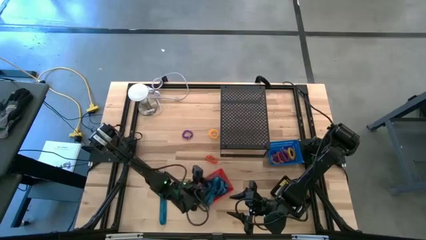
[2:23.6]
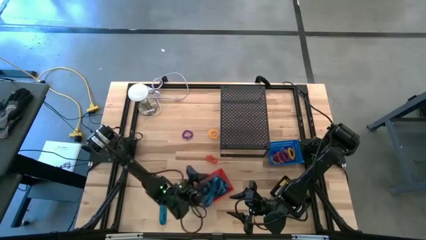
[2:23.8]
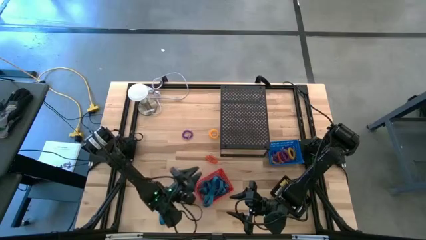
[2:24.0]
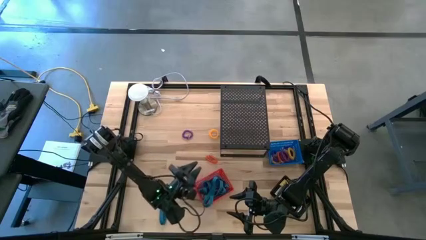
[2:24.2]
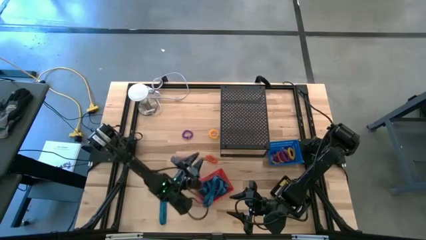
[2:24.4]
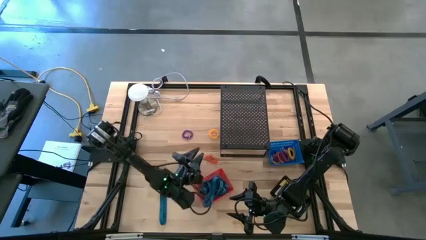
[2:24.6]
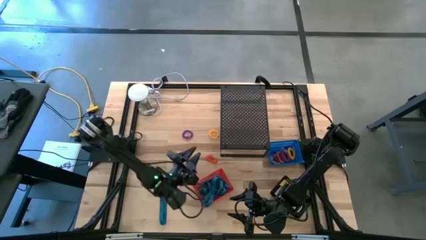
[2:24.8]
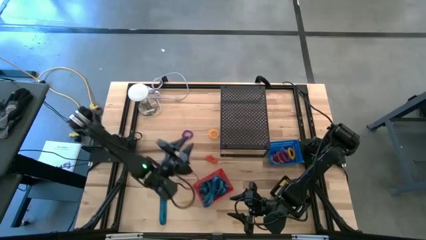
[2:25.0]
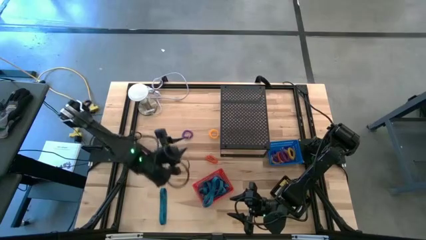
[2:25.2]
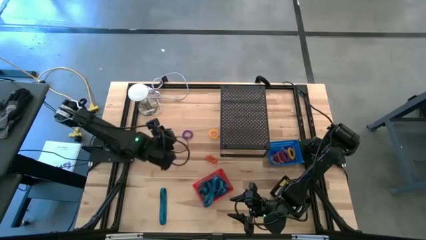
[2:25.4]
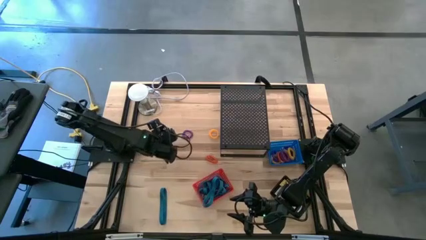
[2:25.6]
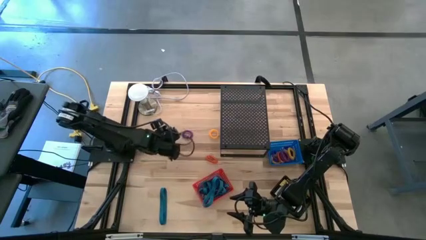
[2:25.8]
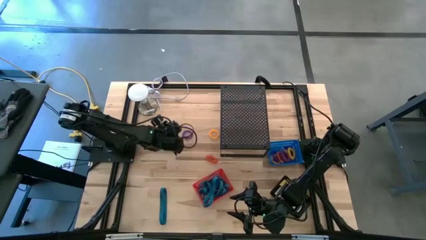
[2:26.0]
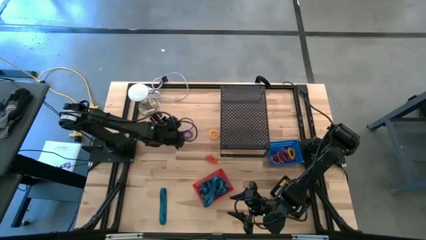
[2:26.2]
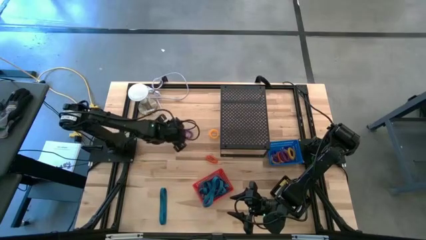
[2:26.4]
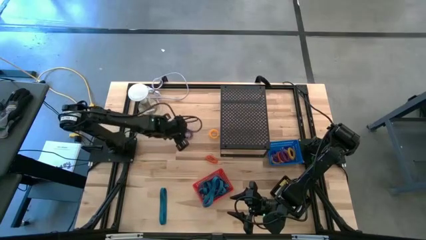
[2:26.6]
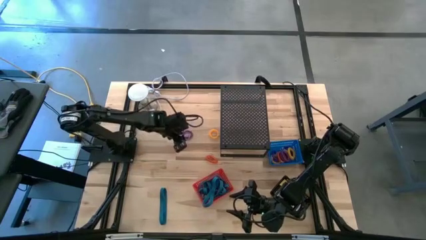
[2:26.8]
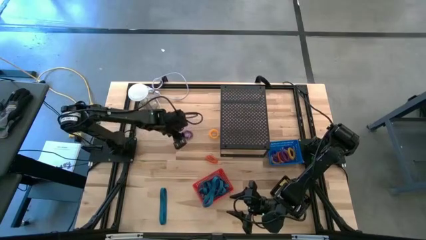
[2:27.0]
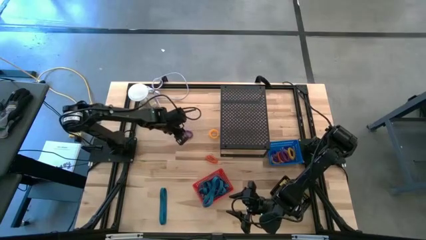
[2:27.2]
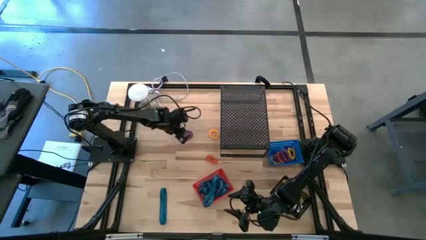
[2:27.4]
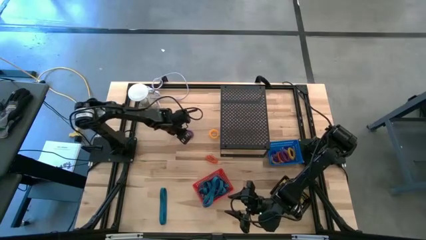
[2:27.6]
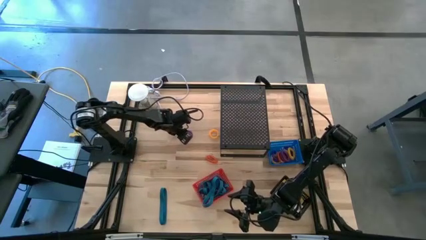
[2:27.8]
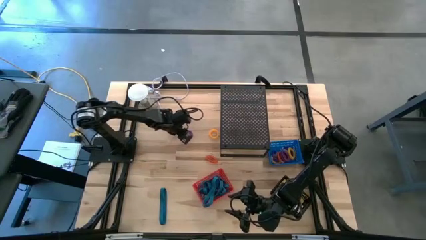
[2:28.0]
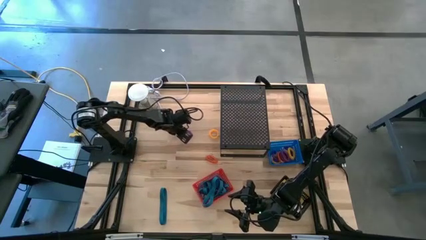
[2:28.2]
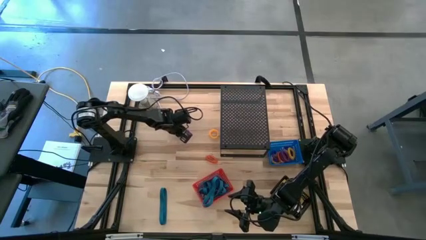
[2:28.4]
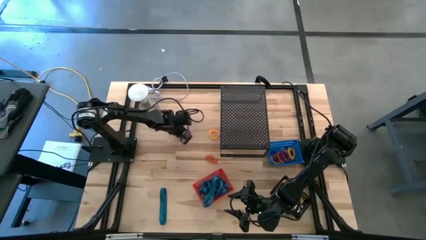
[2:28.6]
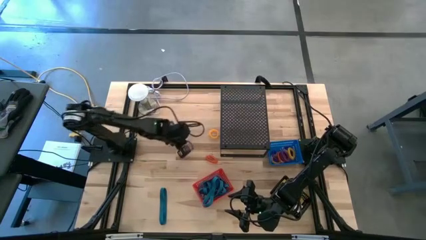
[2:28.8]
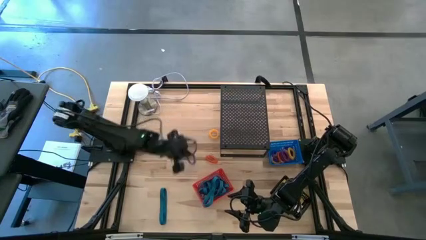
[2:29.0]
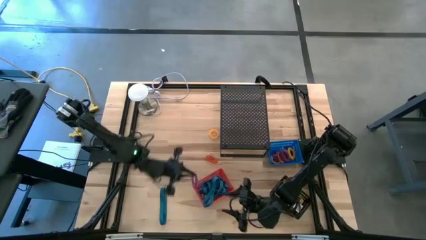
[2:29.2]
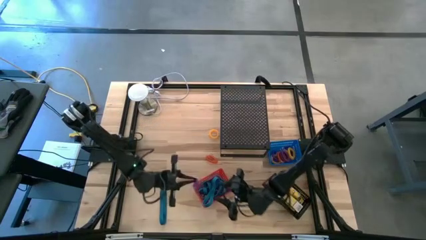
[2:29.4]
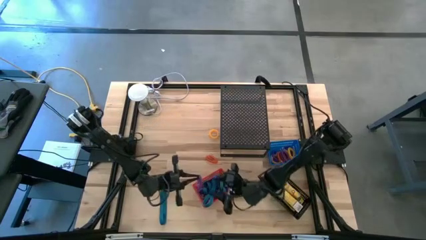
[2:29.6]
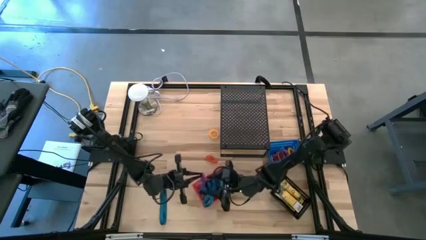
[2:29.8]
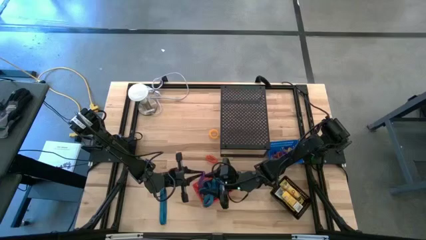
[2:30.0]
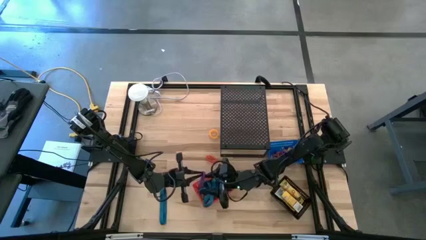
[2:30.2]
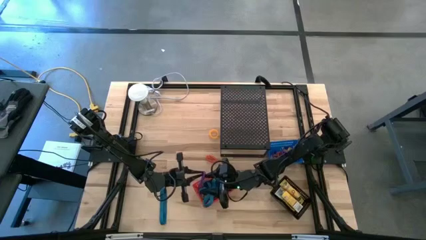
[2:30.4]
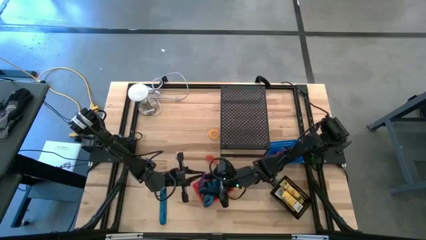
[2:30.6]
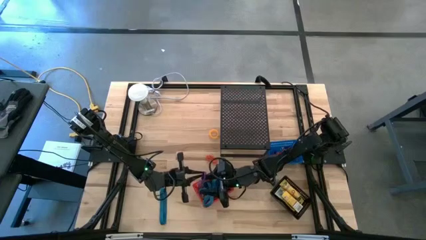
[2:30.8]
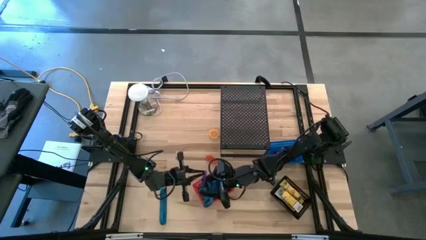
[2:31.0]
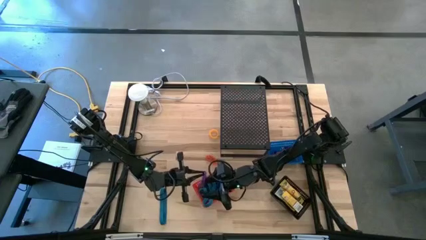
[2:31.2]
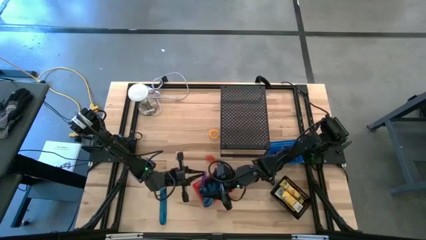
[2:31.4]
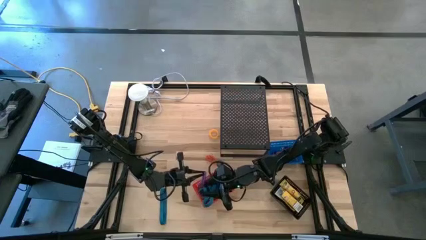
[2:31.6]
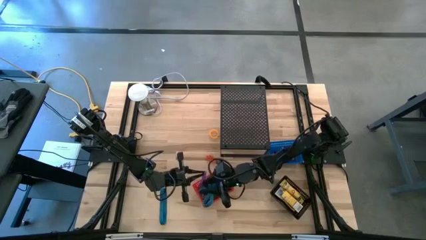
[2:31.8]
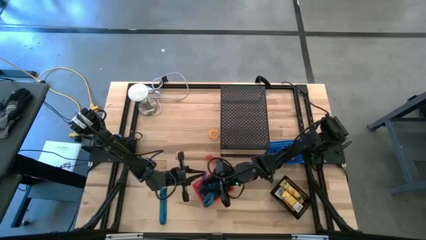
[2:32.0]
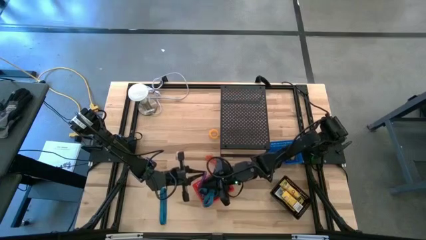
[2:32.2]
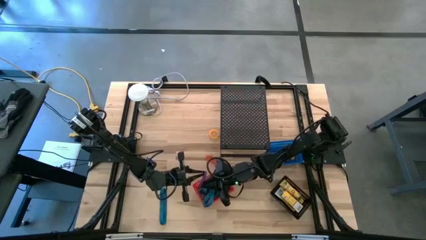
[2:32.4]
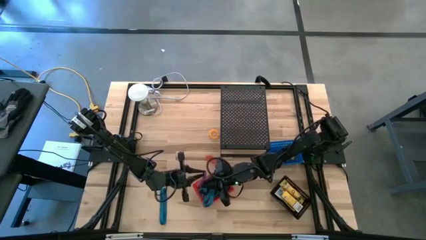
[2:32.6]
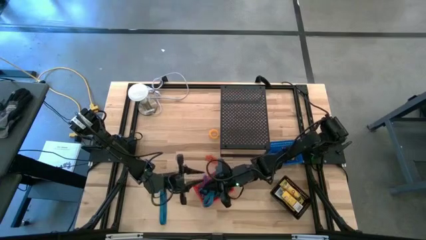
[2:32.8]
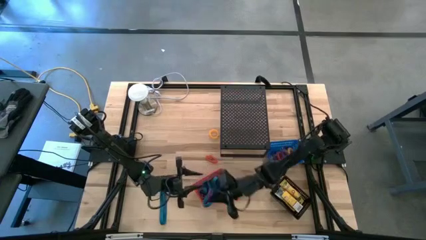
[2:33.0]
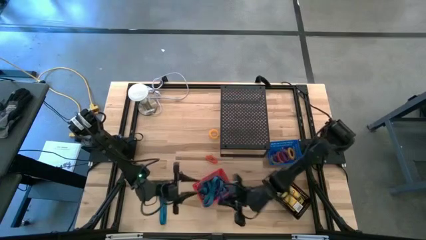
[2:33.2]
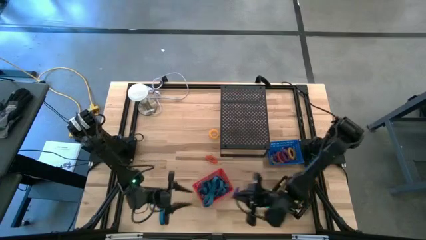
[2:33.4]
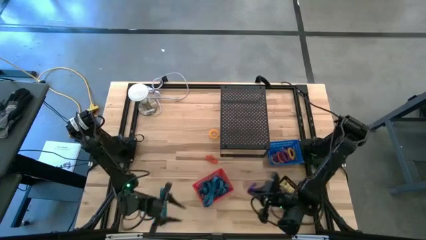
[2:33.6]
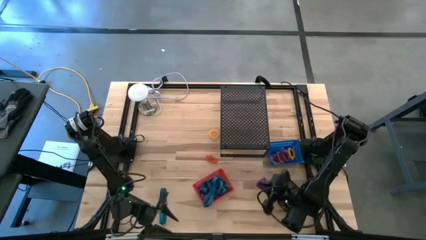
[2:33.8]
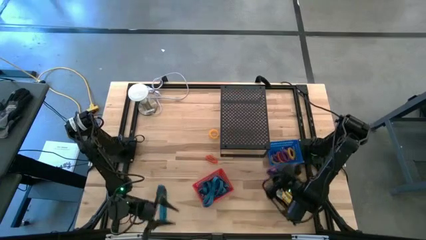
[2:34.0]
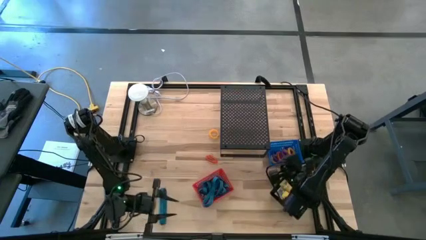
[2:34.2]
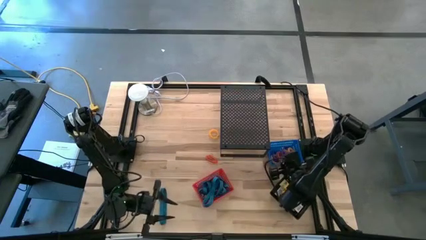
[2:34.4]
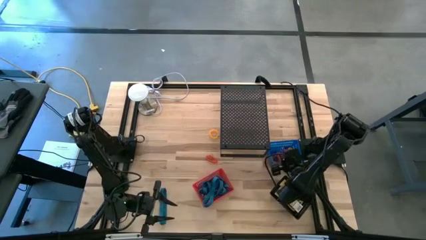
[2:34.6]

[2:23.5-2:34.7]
Task: Pick & Place Office Desk Supplies
Put the purple spring keychain into the blue basket

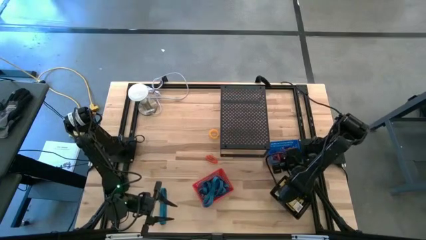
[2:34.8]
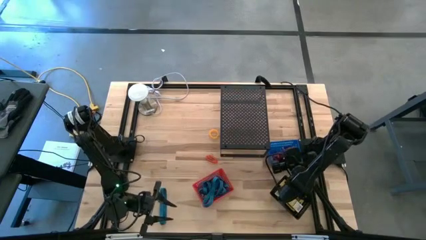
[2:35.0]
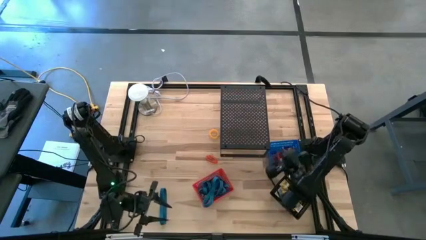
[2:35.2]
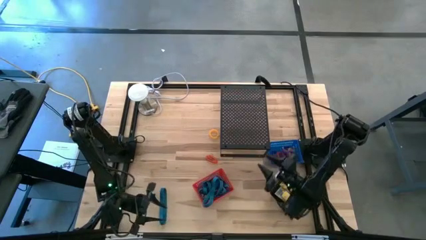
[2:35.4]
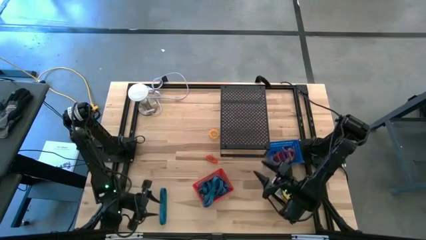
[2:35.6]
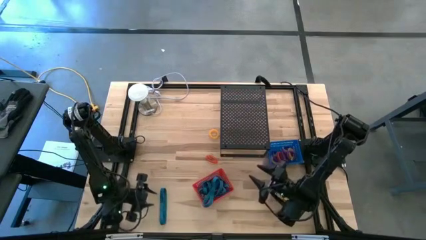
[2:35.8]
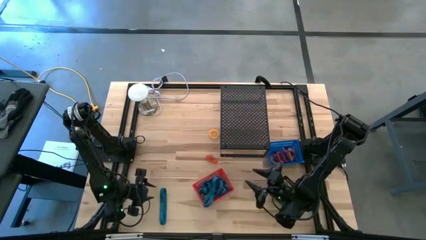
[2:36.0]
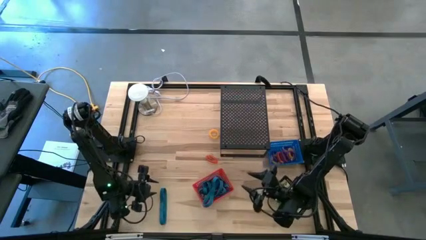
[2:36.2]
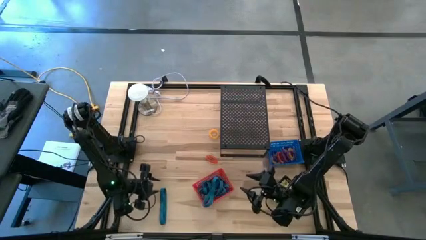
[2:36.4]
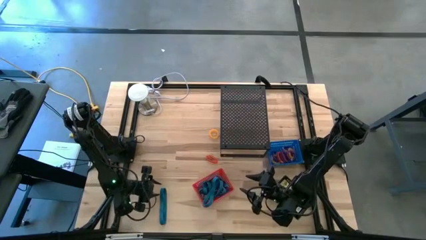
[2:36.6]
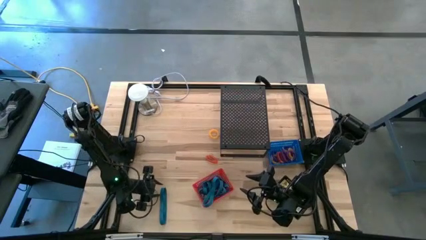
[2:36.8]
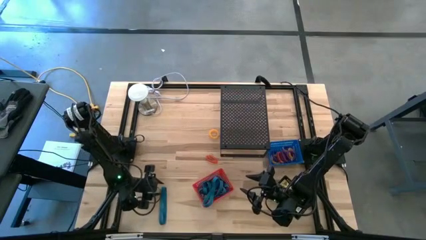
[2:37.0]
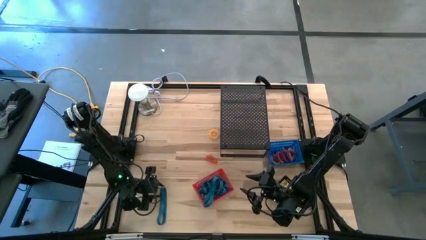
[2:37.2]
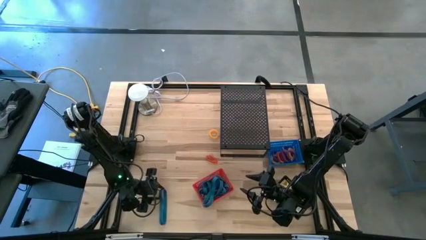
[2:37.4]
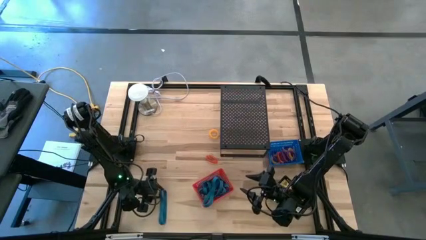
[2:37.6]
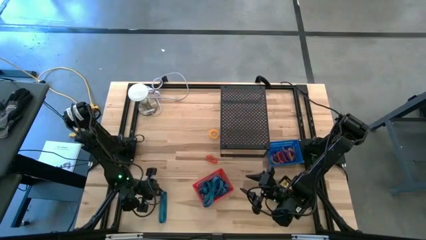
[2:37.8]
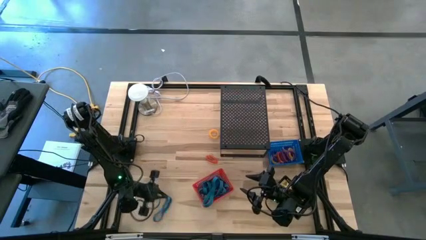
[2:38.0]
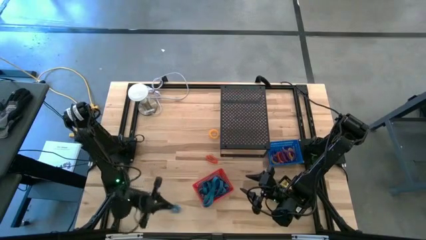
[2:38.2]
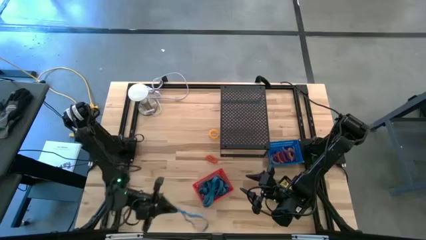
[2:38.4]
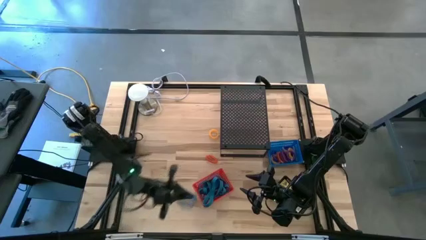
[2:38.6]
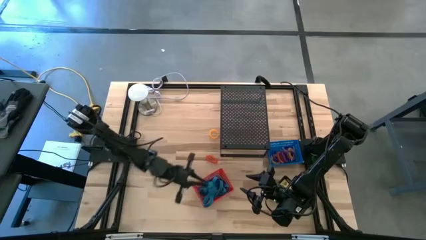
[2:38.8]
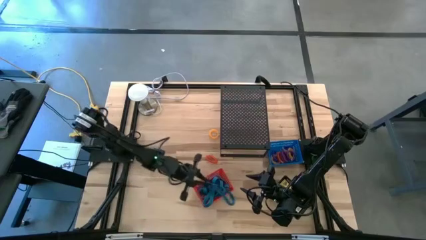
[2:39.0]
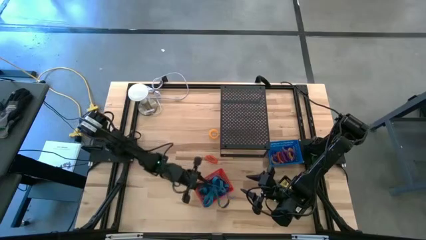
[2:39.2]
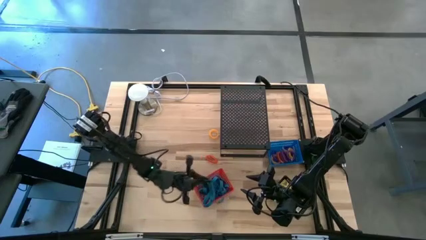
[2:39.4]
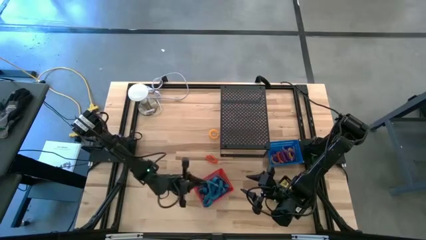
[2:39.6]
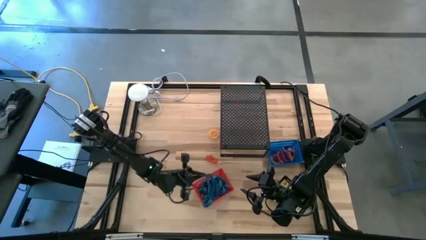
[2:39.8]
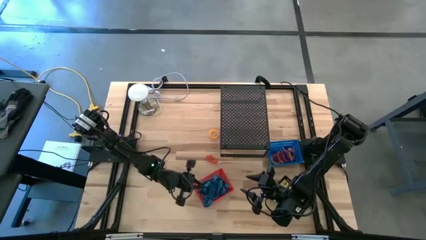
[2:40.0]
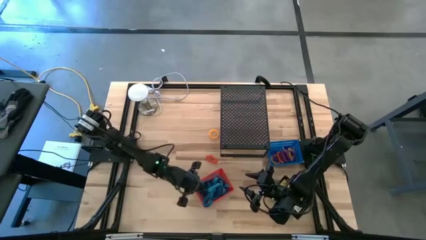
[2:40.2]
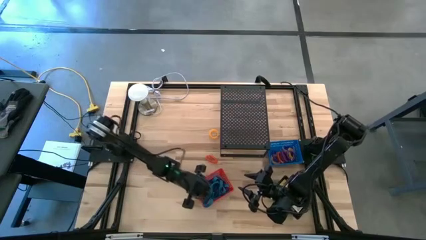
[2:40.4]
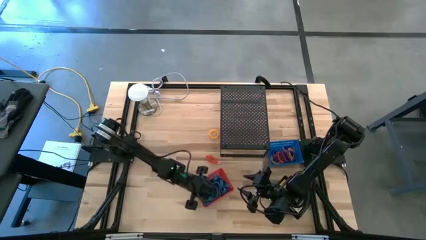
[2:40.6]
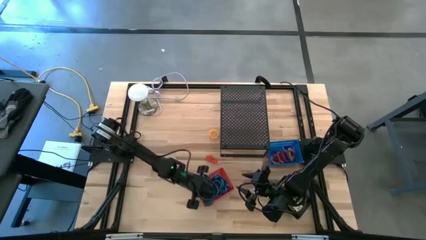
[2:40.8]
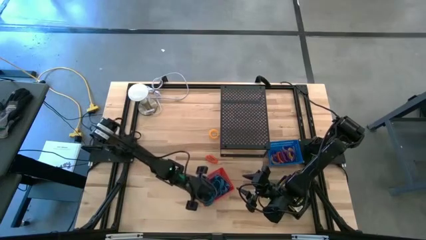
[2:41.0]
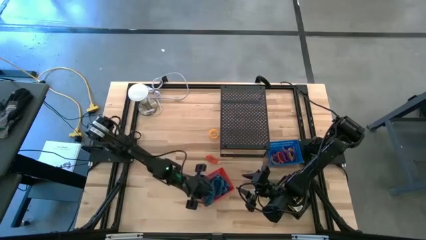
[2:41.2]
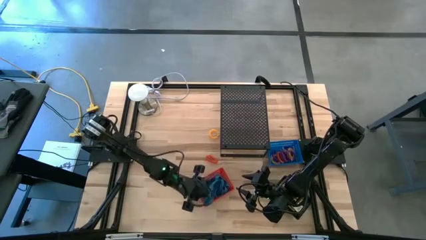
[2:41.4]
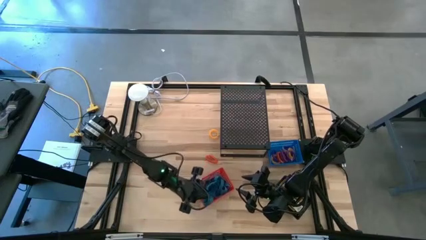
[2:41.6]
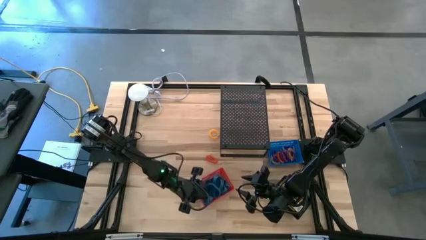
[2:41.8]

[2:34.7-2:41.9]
Put the blue rubberband into the red basket
